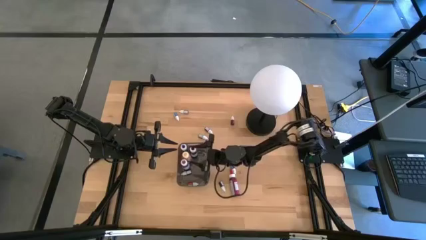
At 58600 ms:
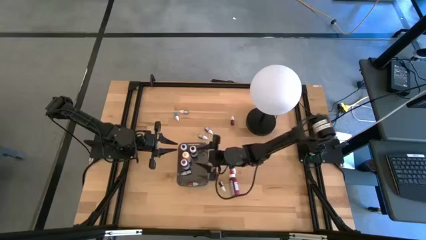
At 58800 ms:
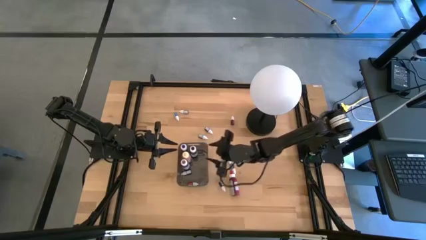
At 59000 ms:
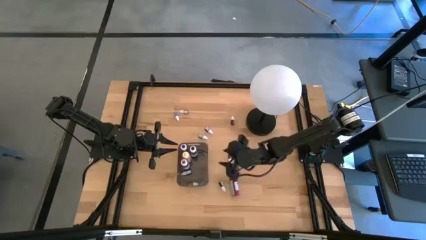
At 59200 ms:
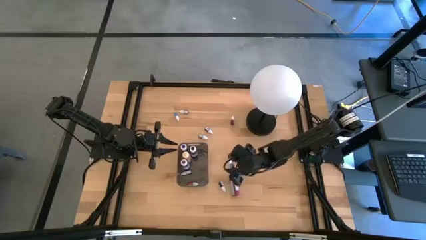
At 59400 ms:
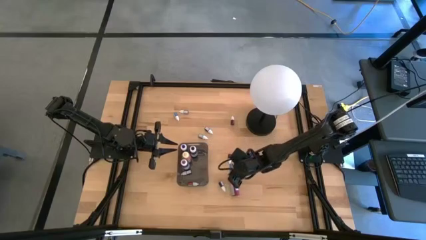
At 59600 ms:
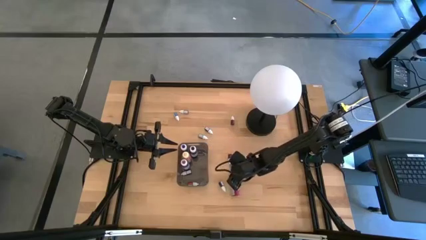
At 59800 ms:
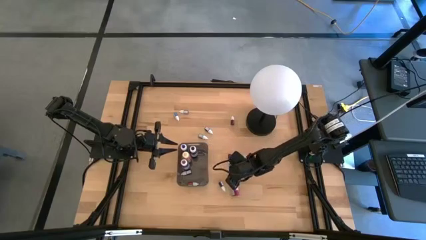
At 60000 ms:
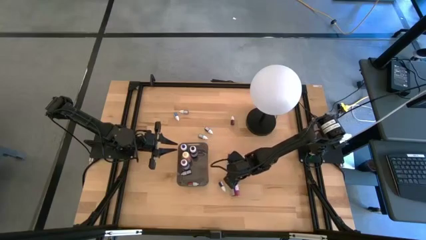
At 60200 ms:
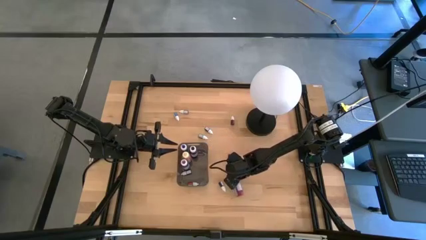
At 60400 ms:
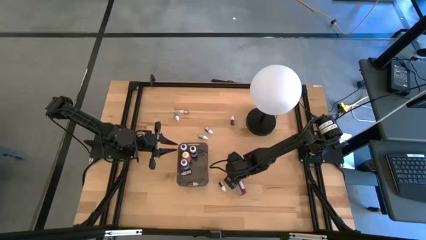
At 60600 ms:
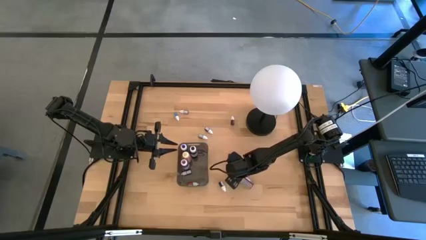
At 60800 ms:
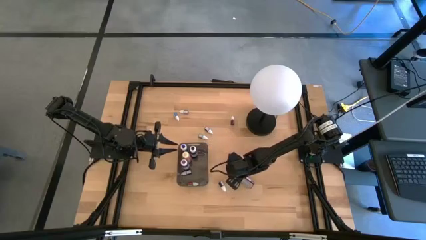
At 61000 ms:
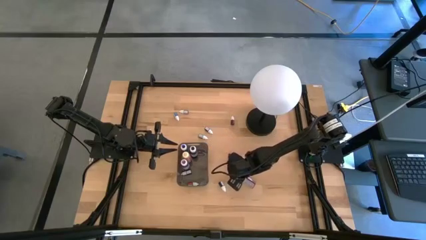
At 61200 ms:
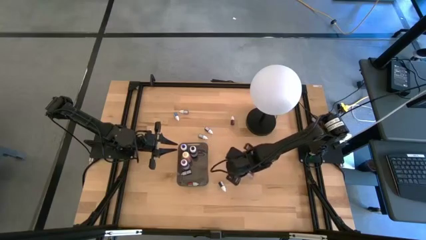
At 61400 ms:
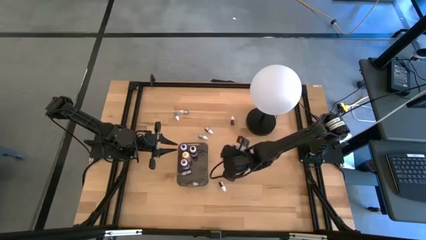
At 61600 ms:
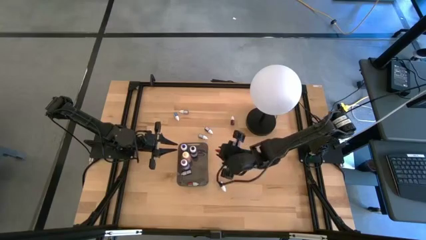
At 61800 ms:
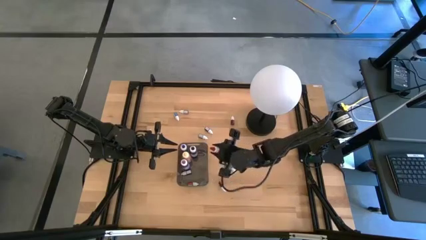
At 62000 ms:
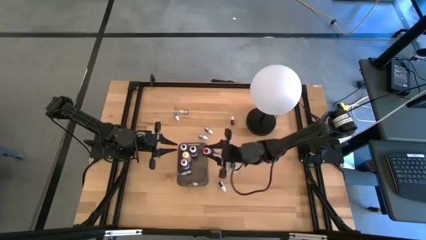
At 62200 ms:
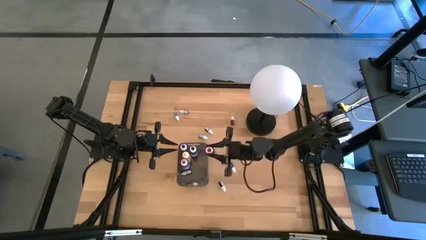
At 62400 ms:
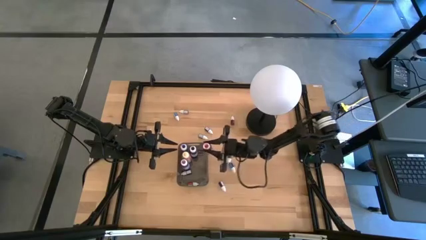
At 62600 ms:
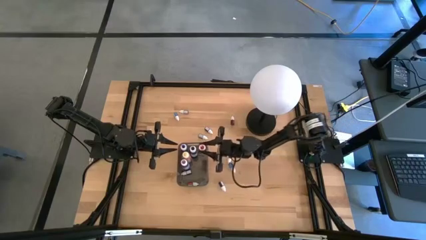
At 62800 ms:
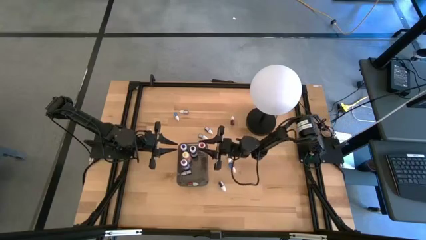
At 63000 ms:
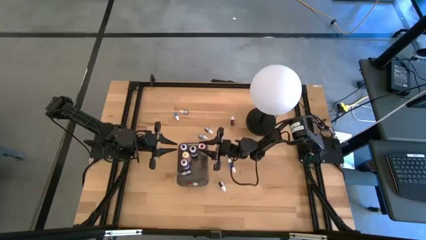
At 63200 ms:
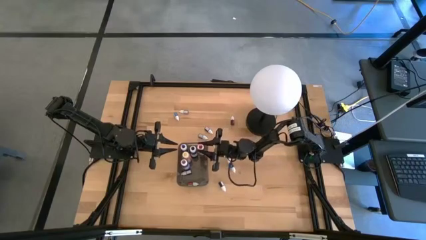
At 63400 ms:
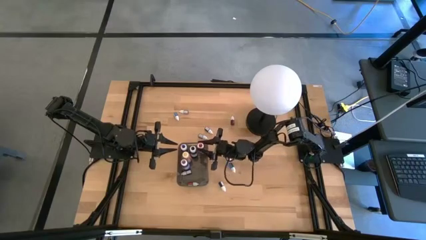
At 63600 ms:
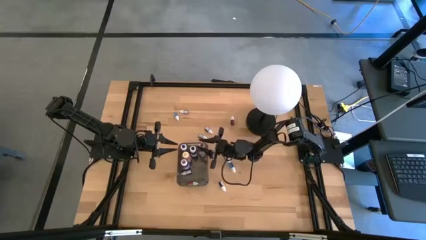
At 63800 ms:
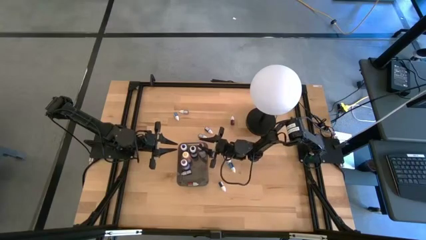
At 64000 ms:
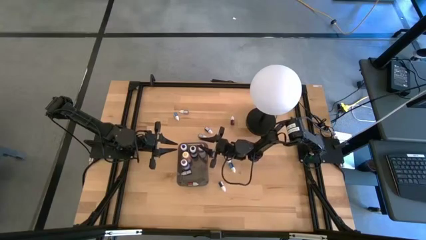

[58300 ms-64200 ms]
Task: Pick & Place food coloring
Put the large red food coloring bottle into the black bin

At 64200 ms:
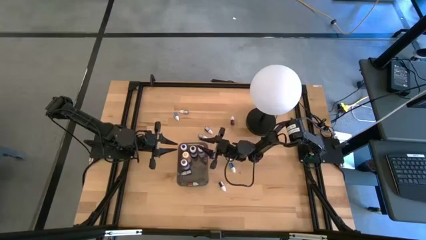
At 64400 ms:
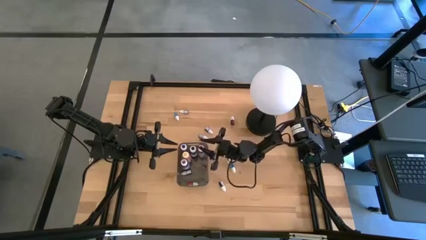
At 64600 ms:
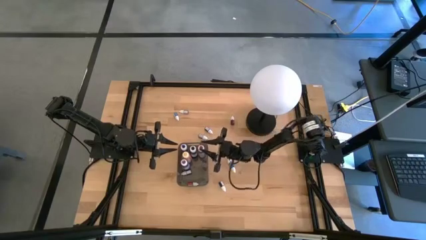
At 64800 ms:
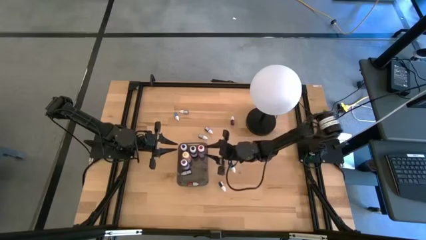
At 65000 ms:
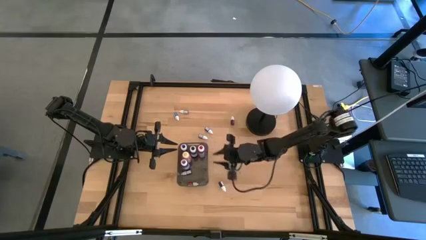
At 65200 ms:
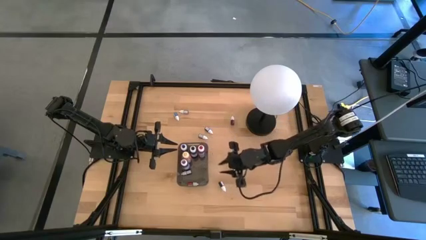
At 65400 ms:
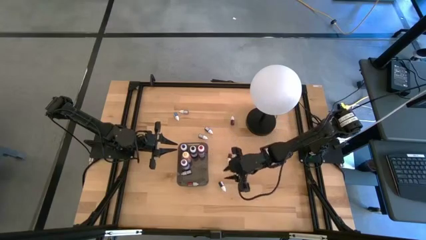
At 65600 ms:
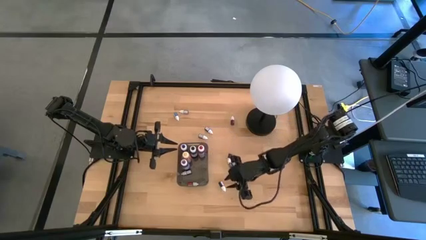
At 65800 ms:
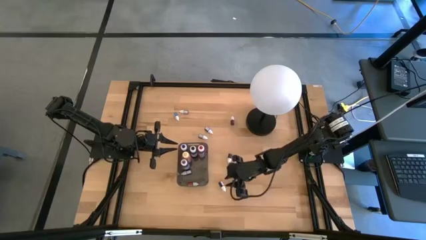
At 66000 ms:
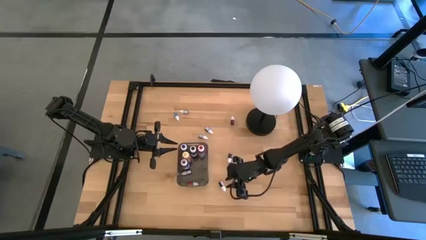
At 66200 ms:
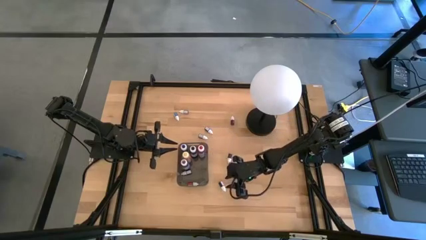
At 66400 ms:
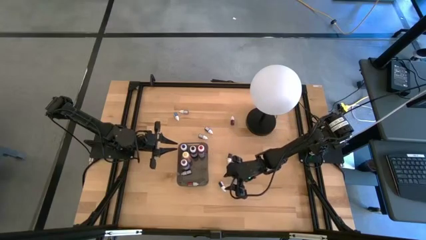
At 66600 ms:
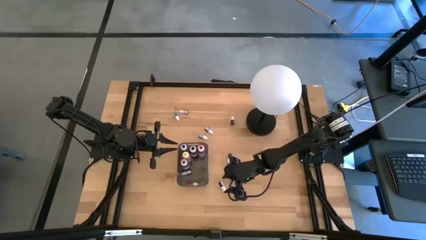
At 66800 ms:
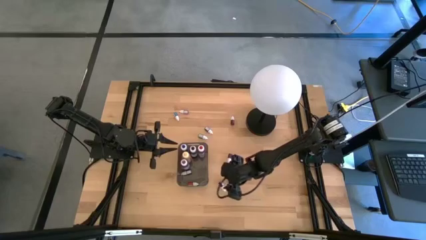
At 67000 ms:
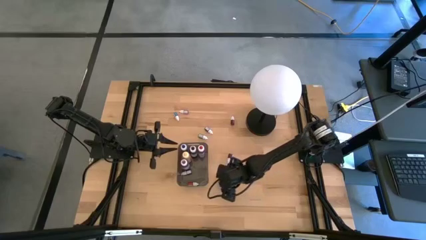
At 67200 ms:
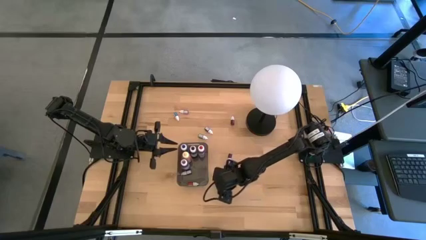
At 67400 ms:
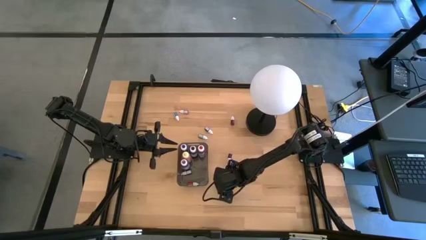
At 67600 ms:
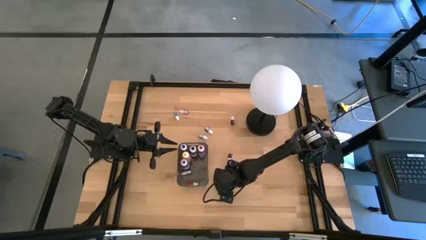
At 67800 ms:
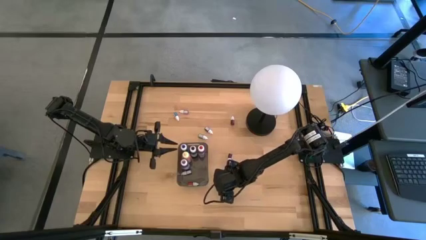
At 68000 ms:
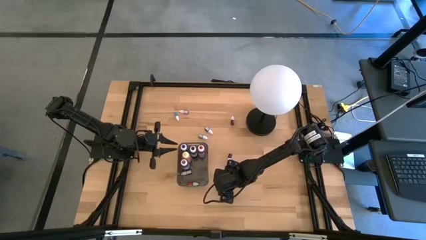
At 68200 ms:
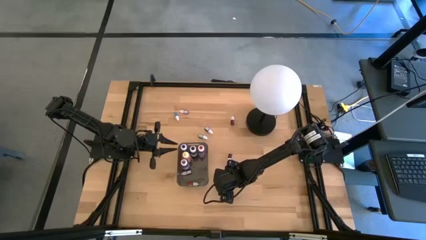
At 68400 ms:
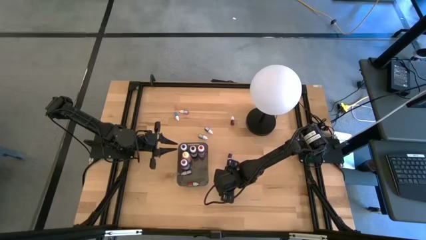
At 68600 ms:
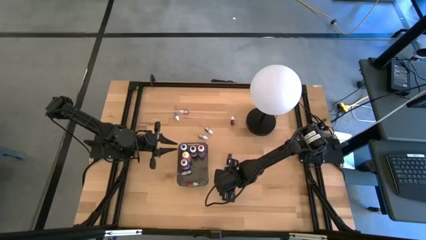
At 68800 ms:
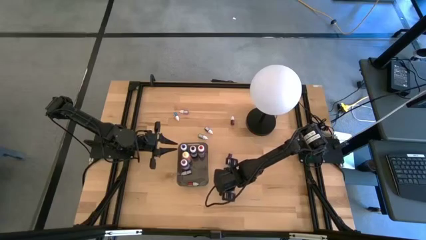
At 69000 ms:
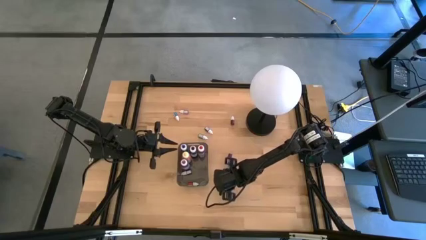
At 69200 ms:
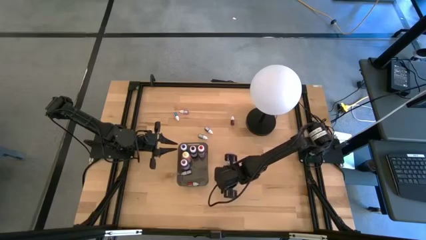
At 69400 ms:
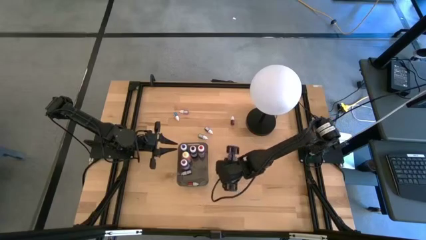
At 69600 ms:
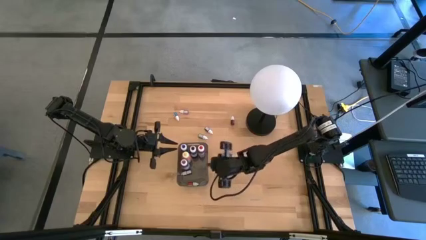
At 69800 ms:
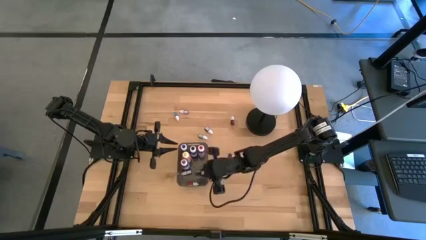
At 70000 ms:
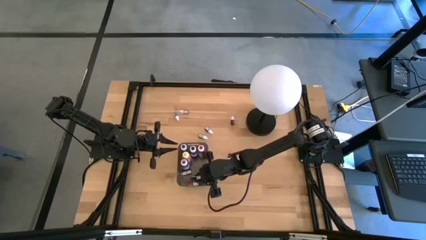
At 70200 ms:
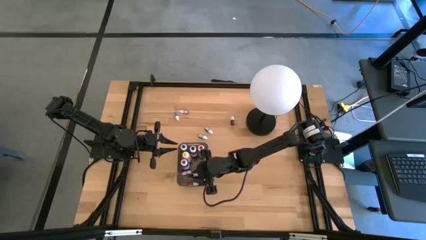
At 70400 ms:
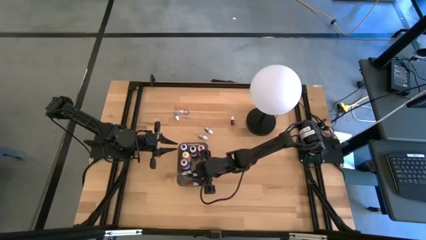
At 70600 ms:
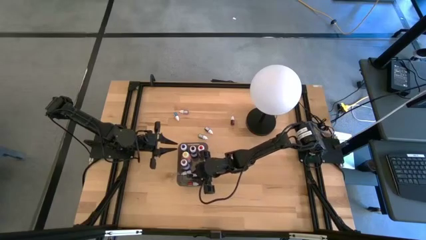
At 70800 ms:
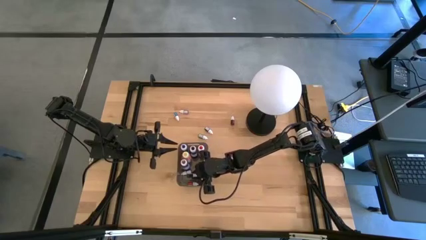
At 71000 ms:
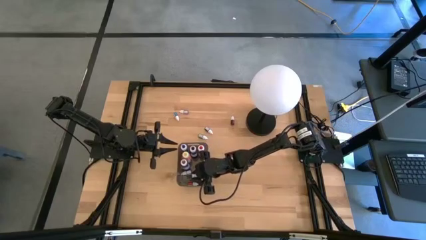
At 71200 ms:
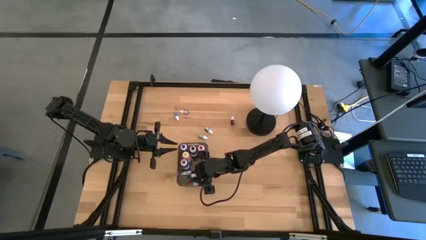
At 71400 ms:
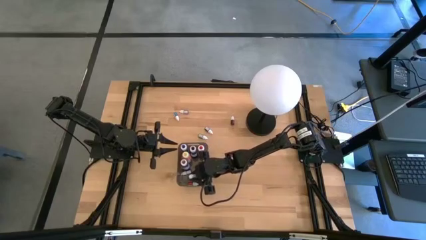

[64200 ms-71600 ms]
Put the small green food coloring bottle into the black bin

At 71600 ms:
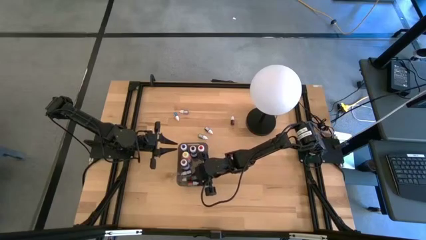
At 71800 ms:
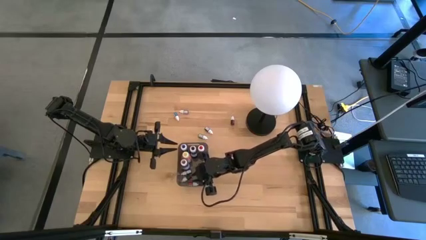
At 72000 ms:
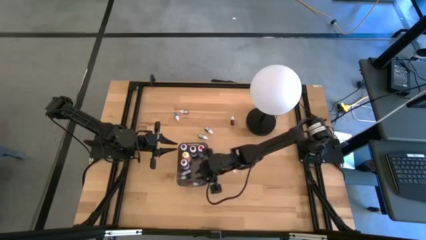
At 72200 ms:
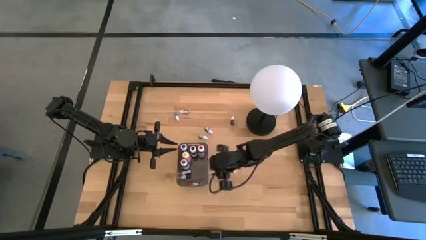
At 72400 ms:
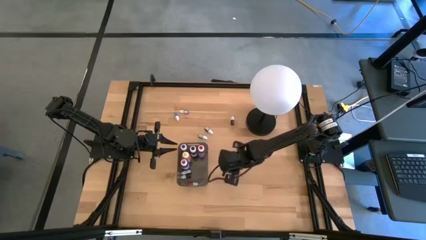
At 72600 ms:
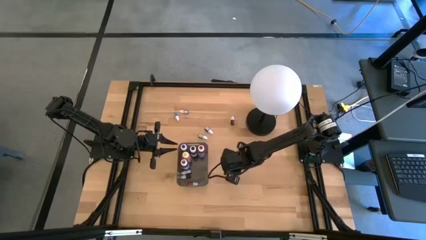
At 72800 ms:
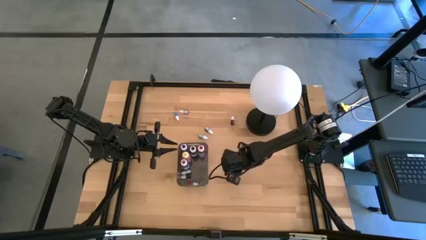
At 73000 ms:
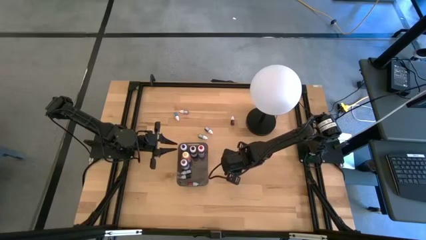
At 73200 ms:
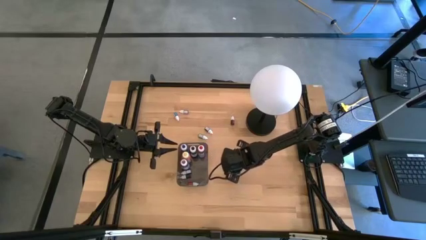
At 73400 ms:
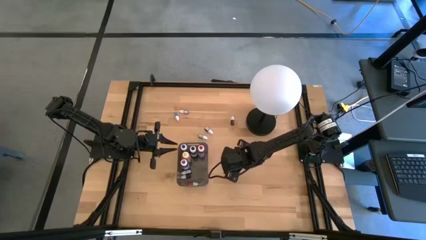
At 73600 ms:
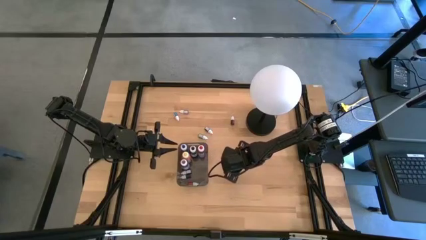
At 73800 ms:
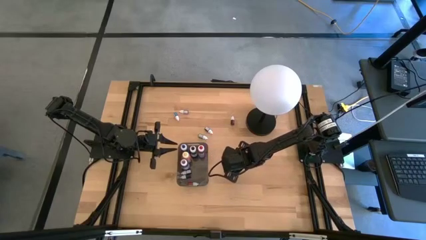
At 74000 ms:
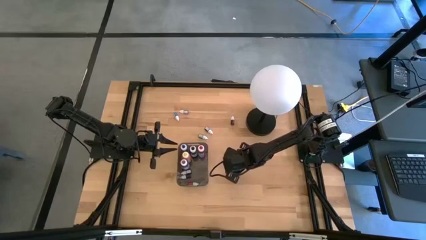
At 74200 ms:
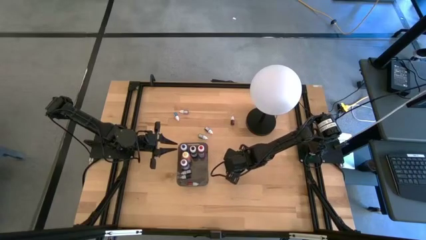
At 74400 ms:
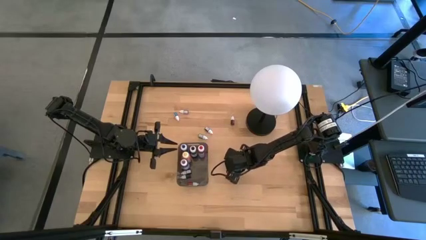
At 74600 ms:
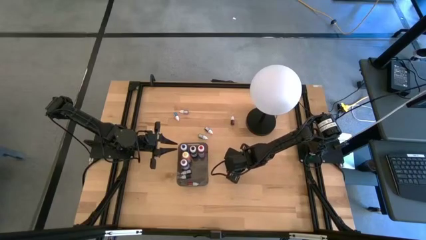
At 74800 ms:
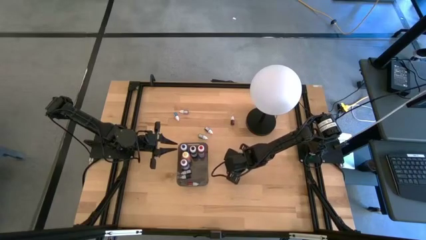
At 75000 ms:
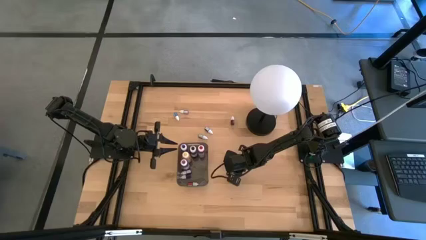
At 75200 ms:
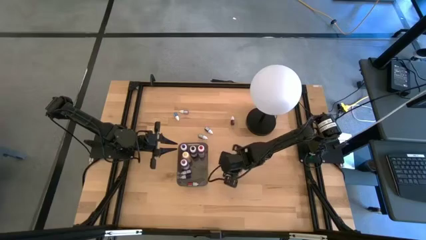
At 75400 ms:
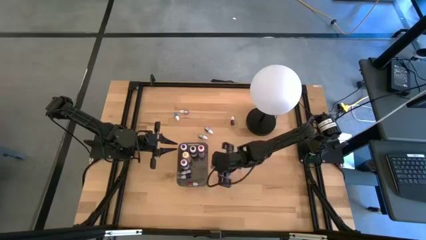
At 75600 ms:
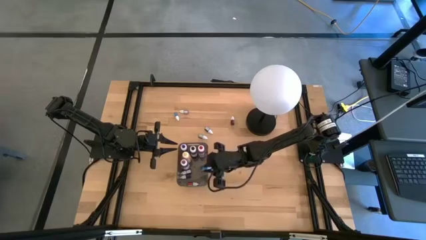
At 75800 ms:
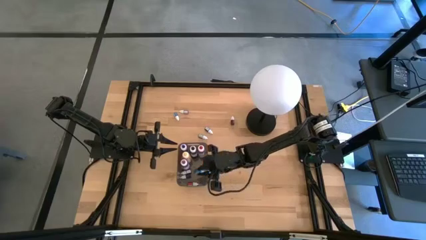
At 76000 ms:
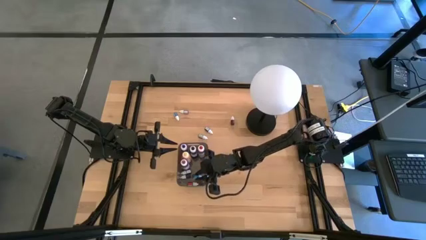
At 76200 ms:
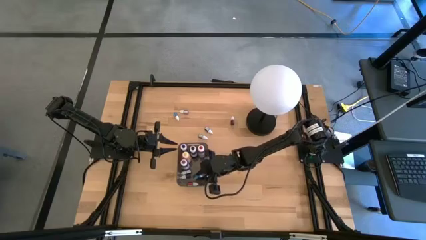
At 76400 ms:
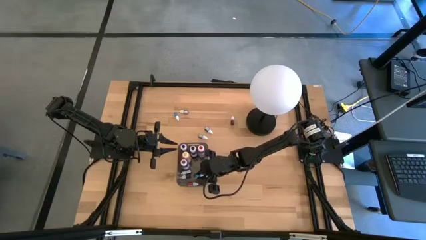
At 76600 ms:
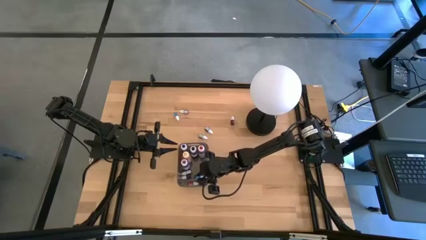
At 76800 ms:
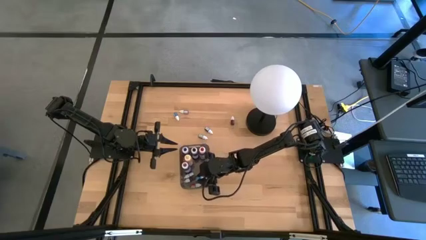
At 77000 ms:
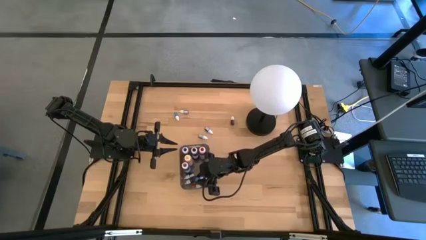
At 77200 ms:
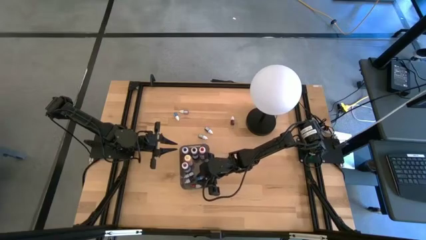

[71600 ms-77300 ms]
Put the small blue food coloring bottle into the black bin
